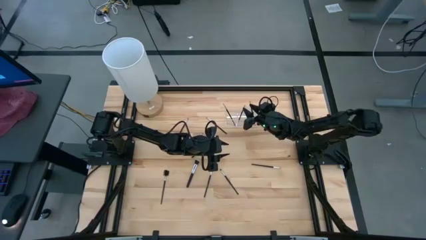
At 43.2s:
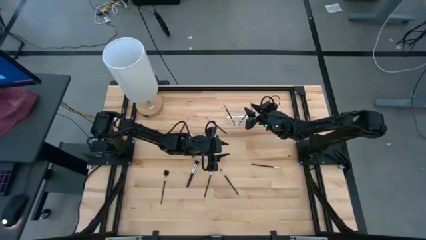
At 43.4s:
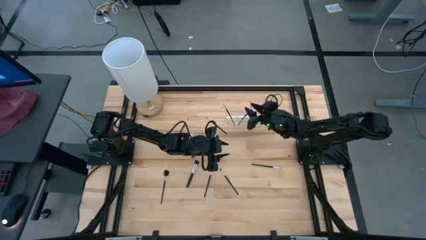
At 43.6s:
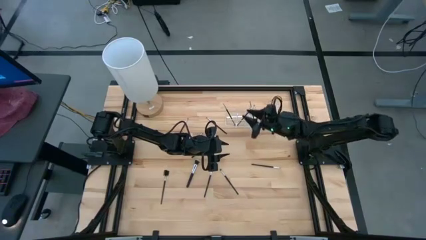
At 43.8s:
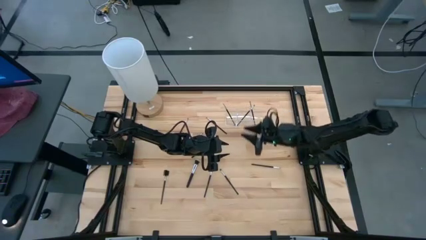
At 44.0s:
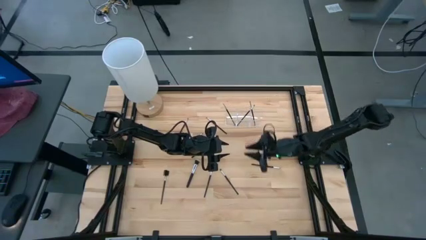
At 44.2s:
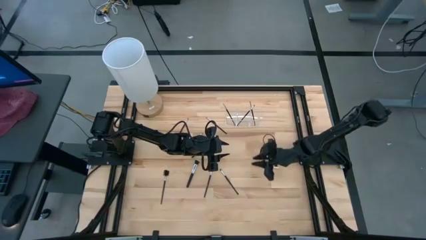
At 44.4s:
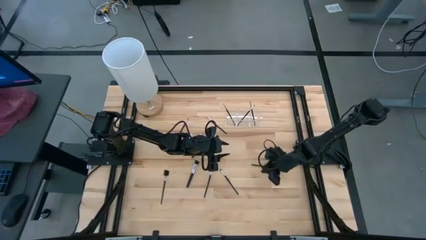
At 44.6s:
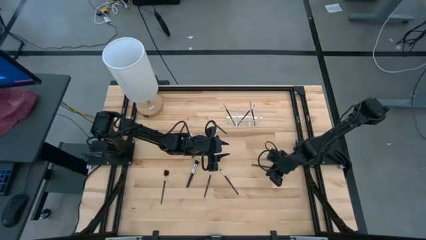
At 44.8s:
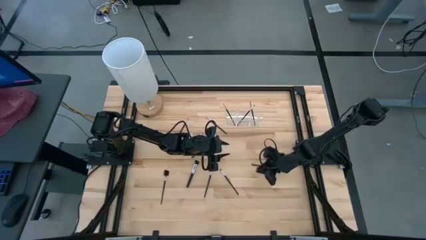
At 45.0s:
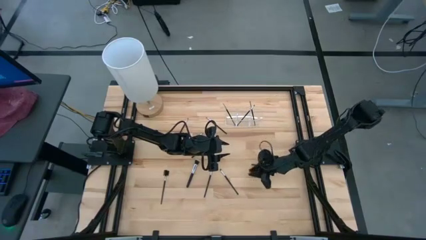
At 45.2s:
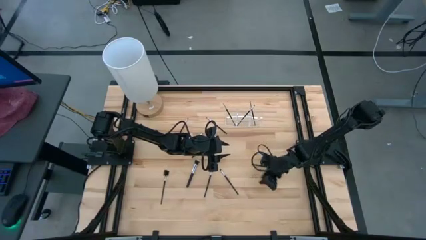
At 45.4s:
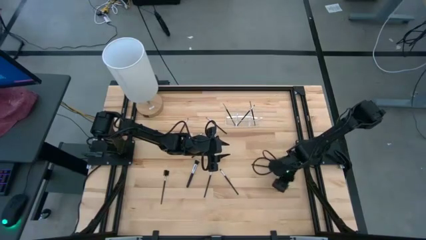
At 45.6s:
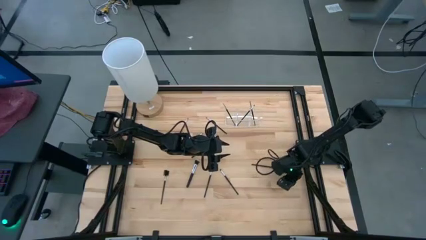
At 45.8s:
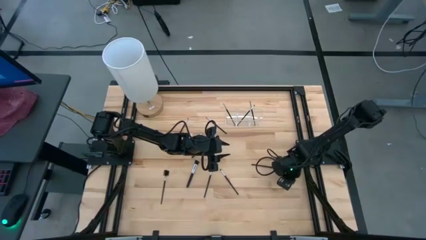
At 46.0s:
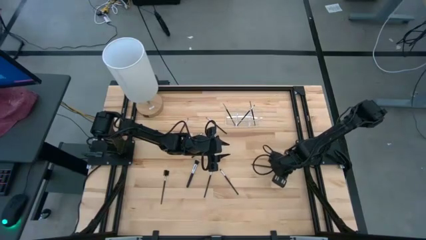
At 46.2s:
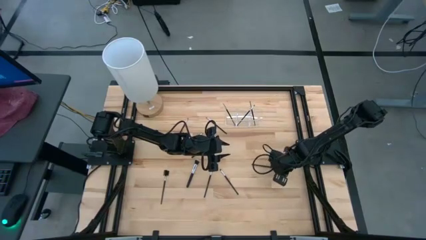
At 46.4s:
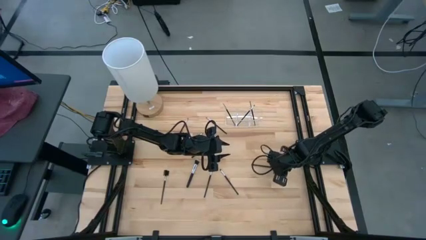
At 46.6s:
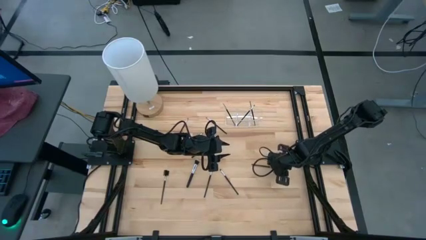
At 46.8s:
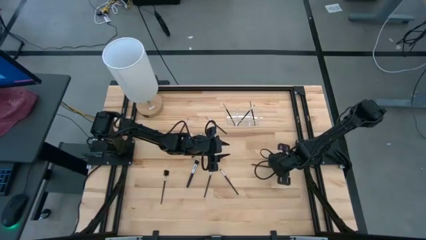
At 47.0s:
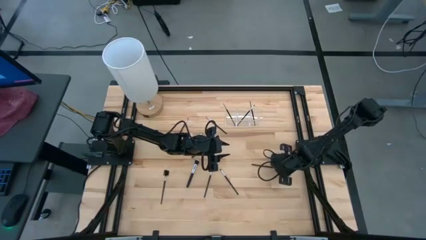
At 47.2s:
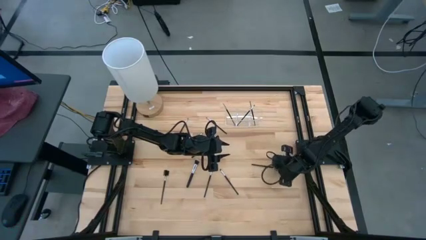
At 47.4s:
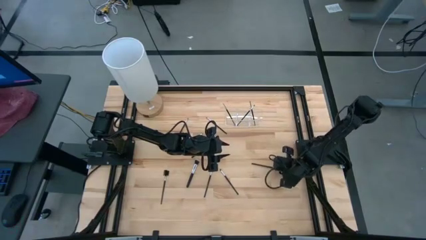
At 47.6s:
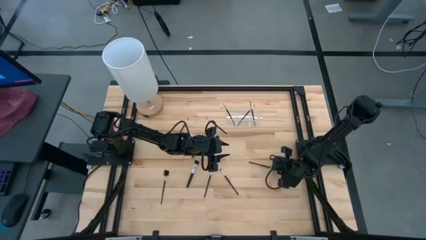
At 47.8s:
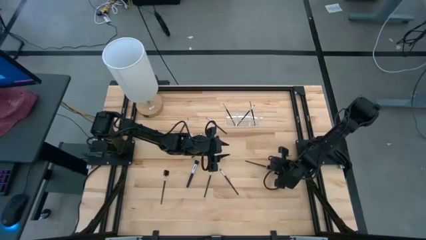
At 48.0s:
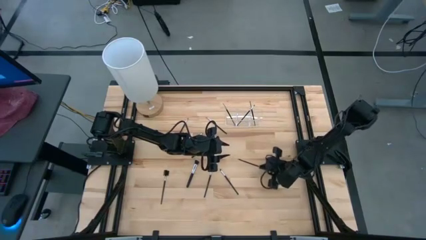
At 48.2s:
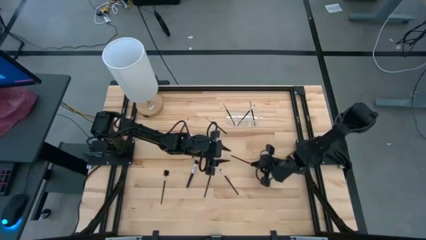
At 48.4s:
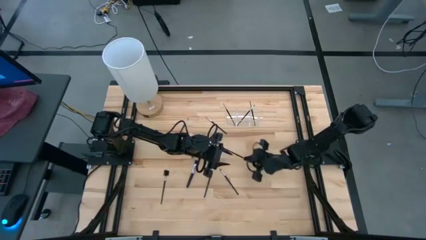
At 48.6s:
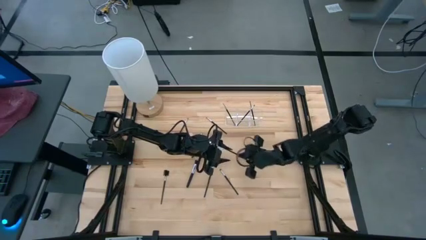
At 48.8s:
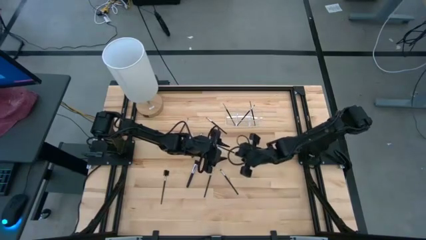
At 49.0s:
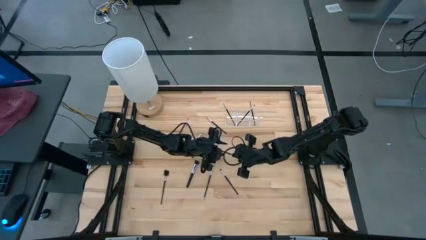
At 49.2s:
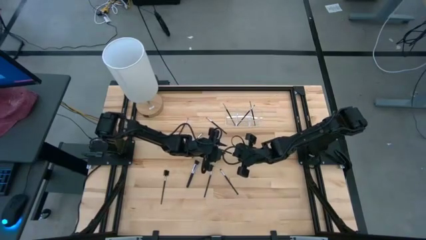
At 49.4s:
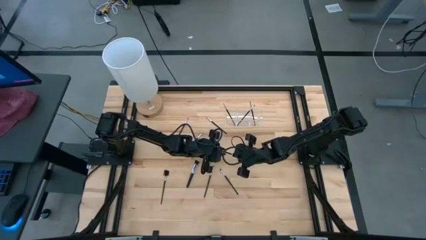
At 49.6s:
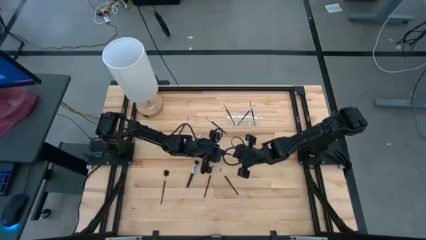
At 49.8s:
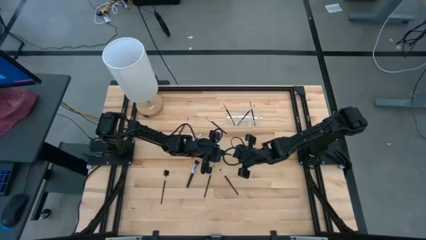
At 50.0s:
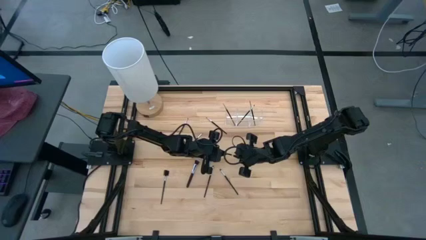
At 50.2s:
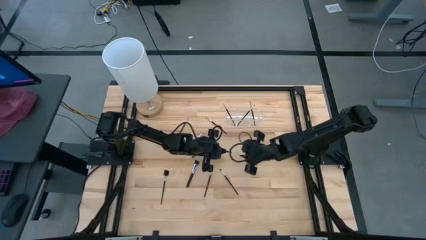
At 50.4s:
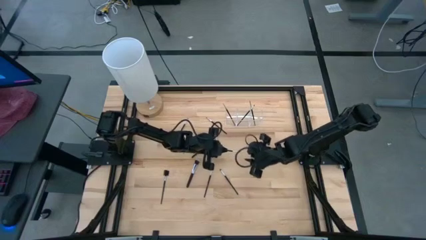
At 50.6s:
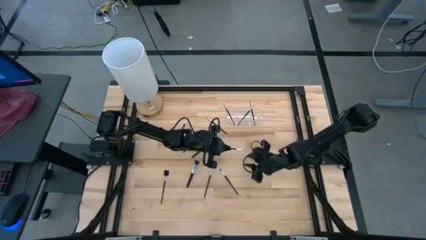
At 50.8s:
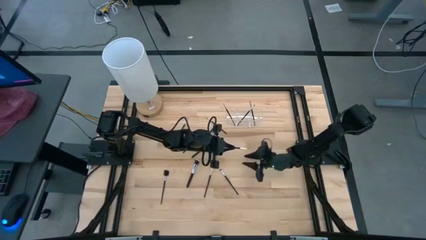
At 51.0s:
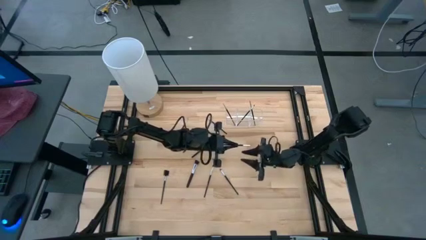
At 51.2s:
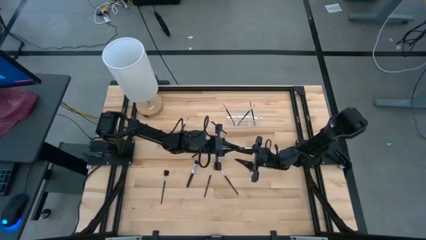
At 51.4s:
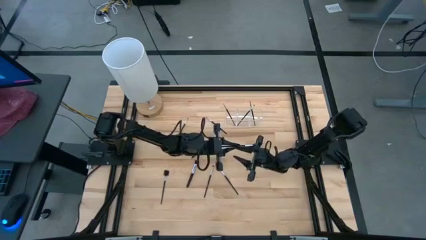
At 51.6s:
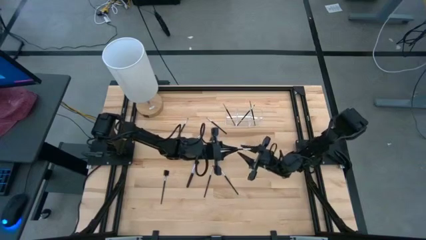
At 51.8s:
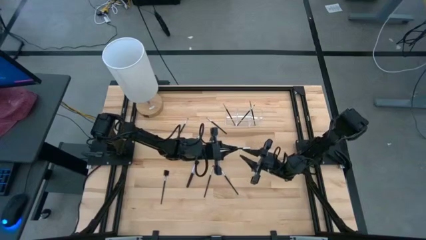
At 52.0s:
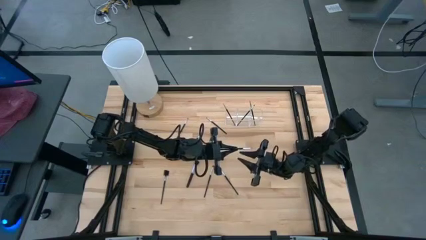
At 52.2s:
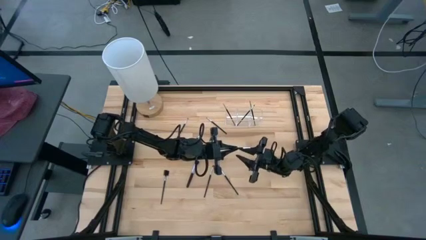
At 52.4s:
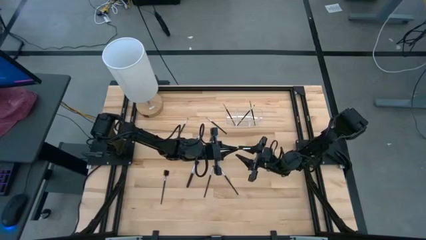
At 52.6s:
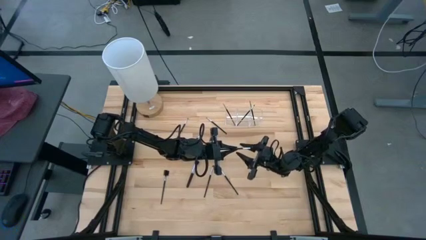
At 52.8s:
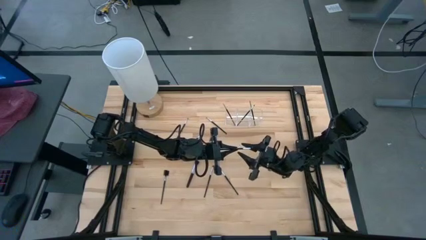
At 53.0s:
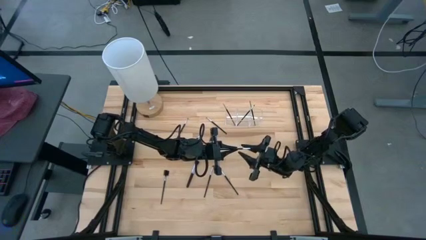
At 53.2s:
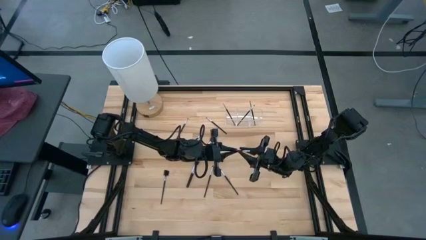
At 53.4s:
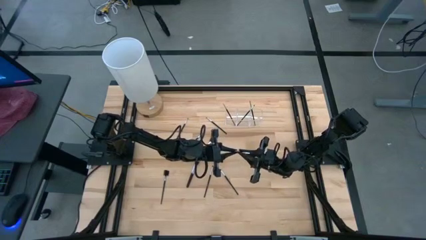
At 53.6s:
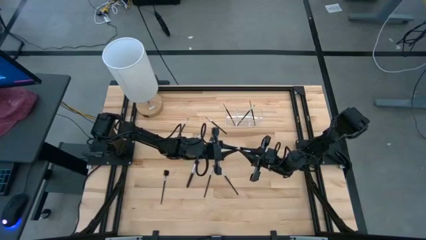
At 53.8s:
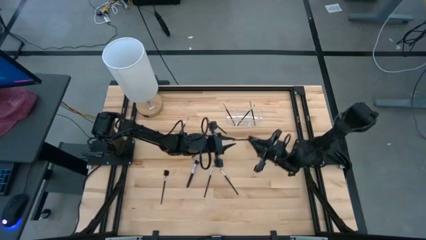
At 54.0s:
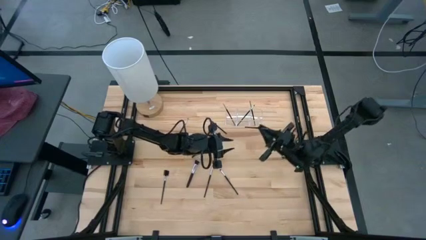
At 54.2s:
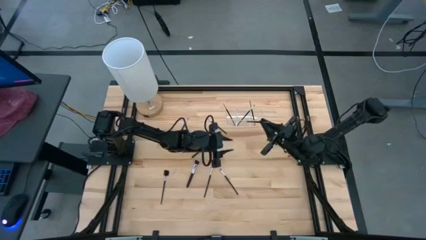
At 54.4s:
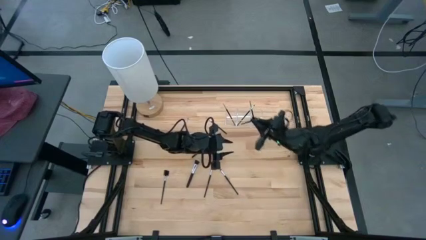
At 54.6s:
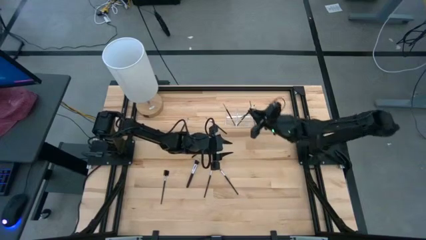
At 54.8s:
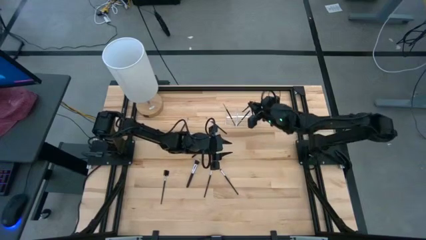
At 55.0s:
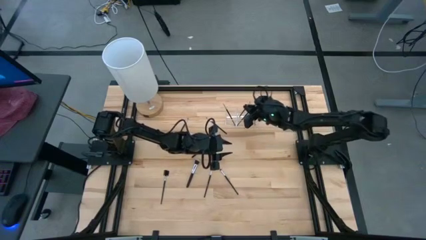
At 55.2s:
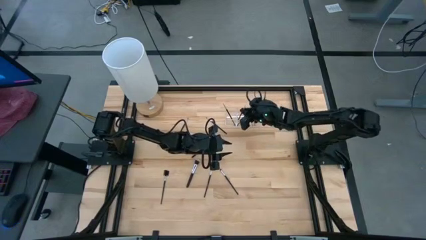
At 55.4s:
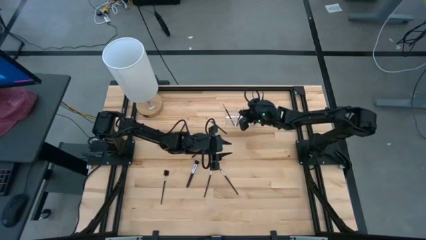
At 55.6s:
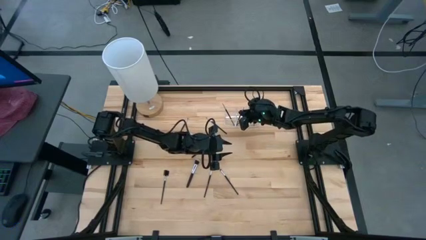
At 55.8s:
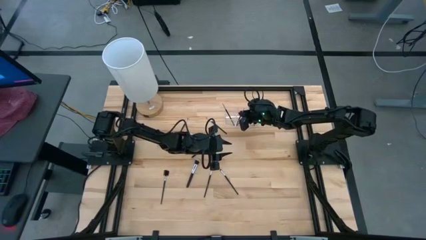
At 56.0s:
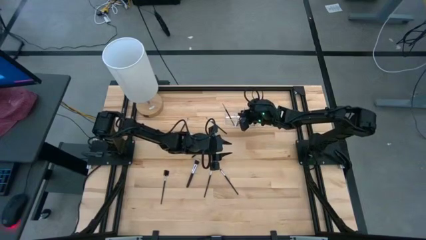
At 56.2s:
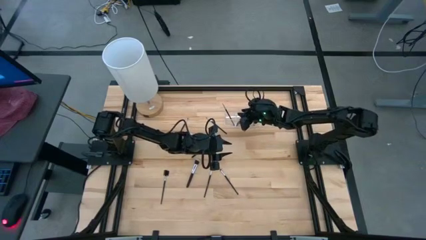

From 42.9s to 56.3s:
Task: Put items in baskets/containers
Put the black liner brush into the transparent organizer
